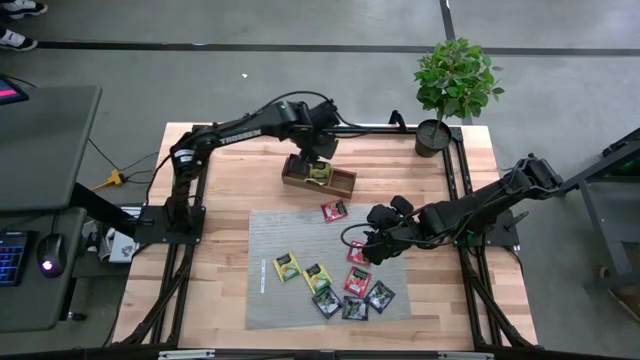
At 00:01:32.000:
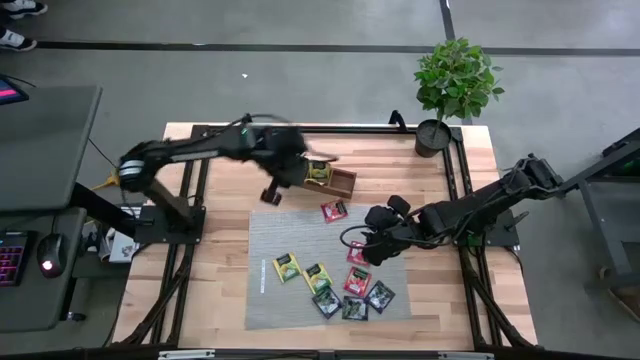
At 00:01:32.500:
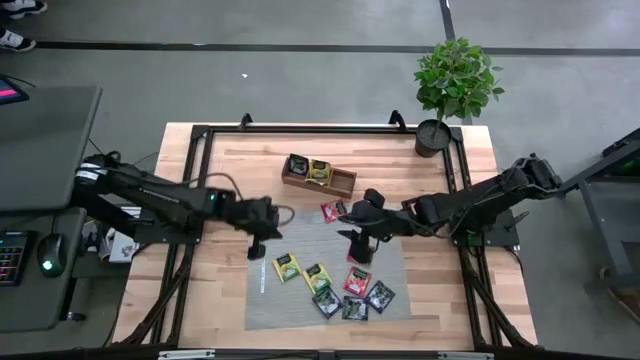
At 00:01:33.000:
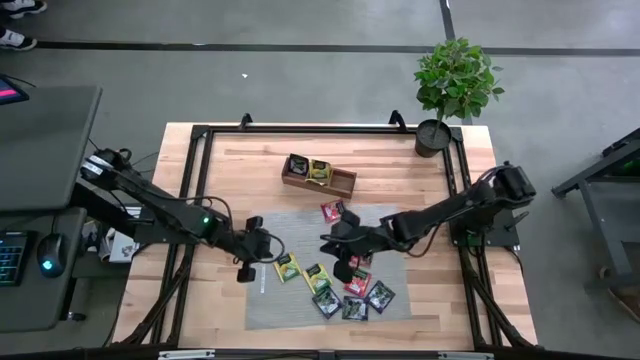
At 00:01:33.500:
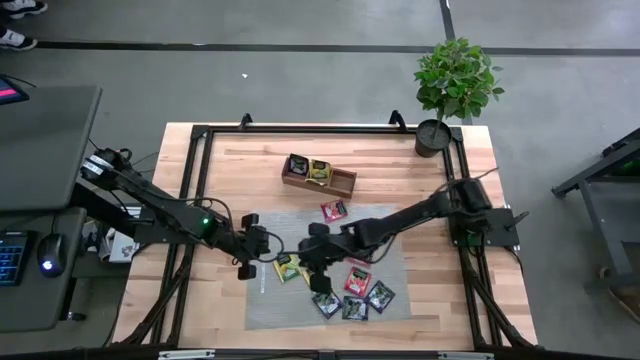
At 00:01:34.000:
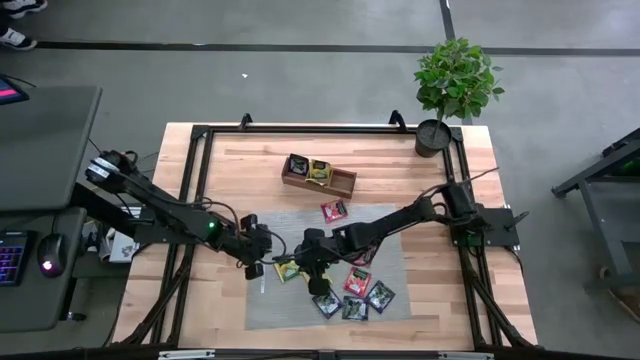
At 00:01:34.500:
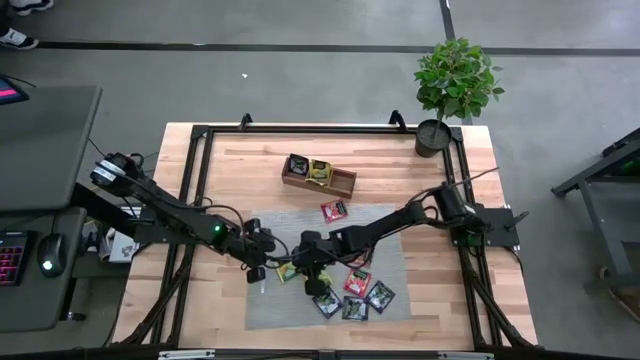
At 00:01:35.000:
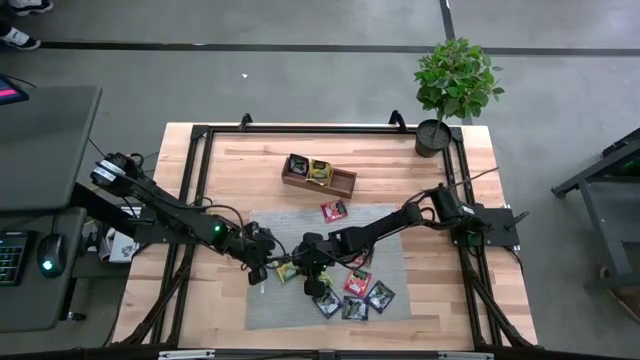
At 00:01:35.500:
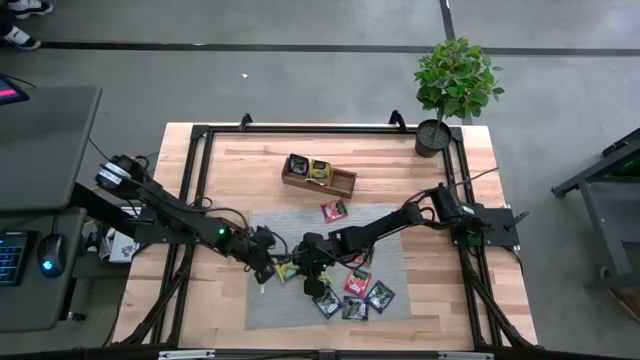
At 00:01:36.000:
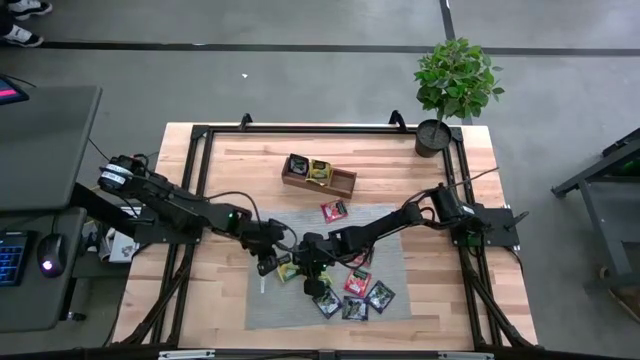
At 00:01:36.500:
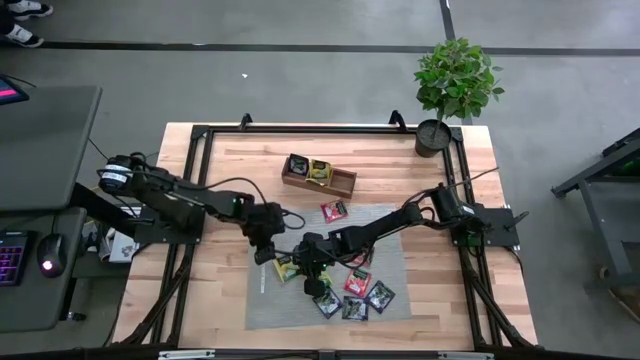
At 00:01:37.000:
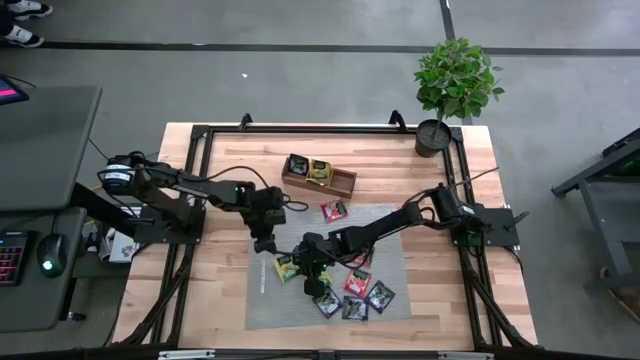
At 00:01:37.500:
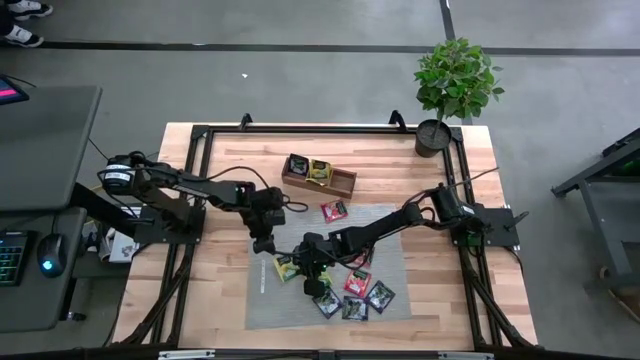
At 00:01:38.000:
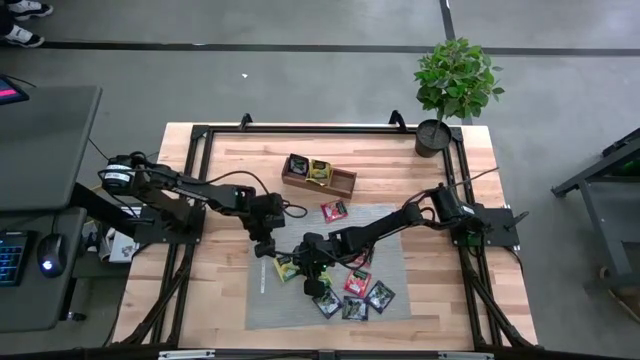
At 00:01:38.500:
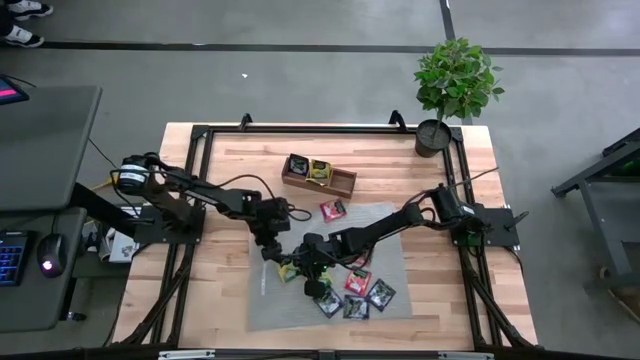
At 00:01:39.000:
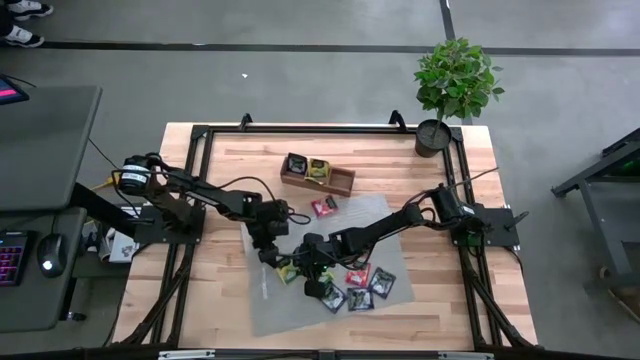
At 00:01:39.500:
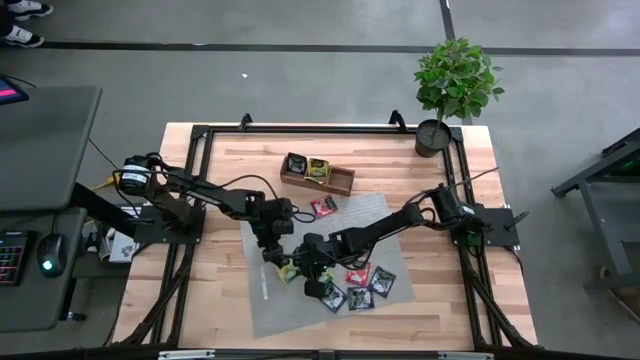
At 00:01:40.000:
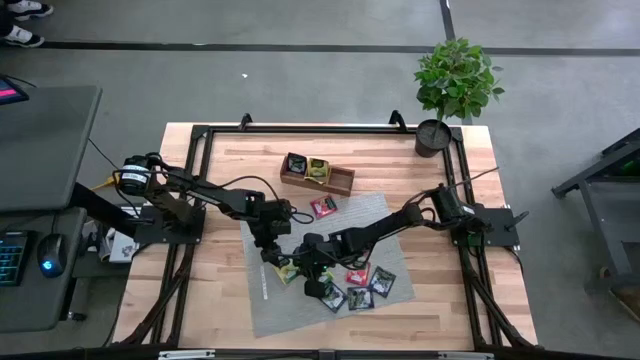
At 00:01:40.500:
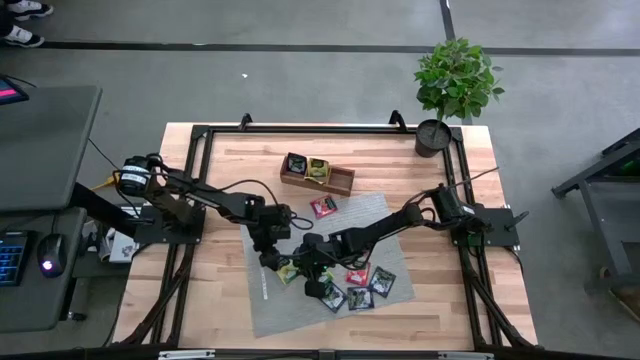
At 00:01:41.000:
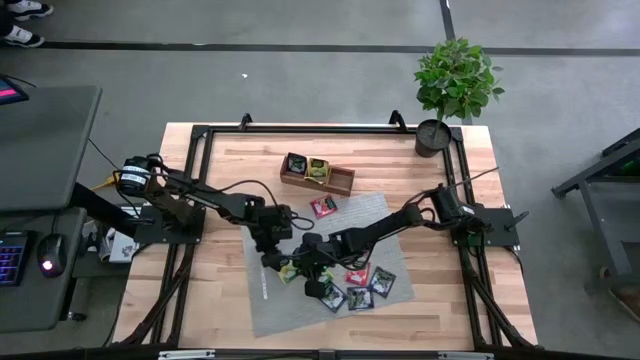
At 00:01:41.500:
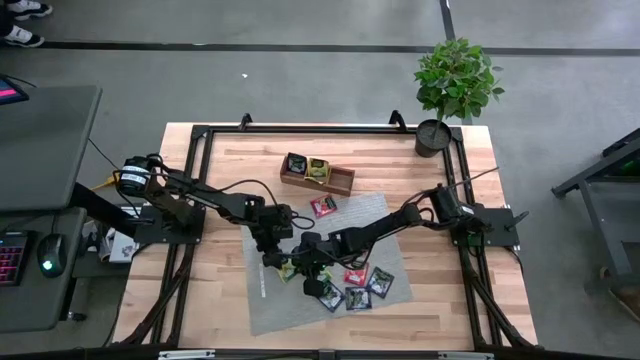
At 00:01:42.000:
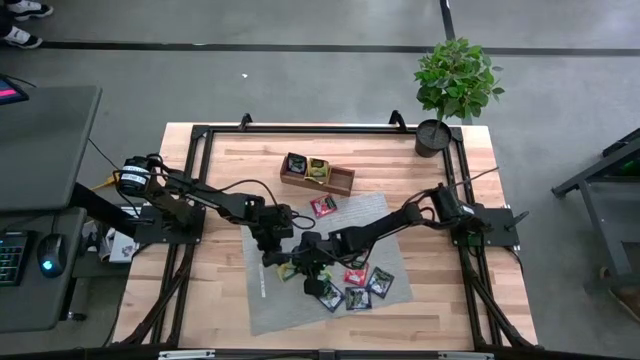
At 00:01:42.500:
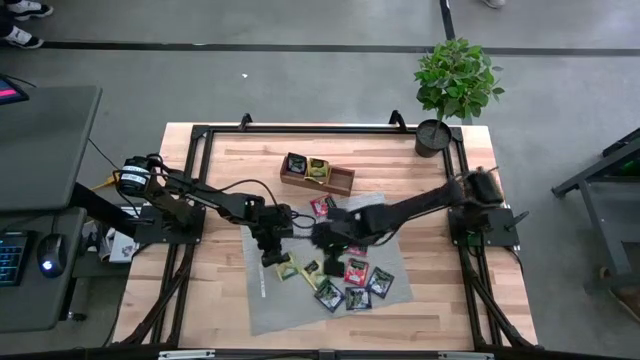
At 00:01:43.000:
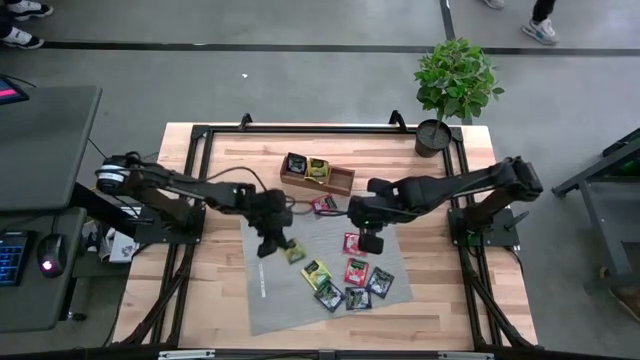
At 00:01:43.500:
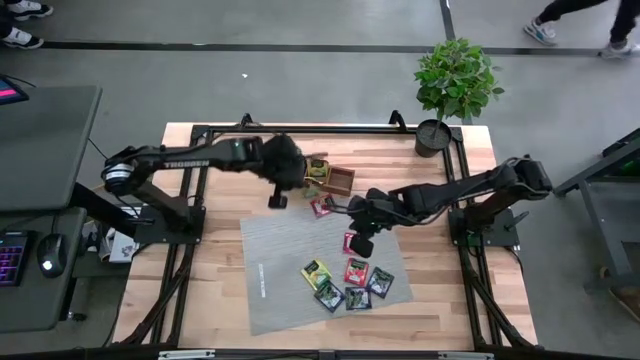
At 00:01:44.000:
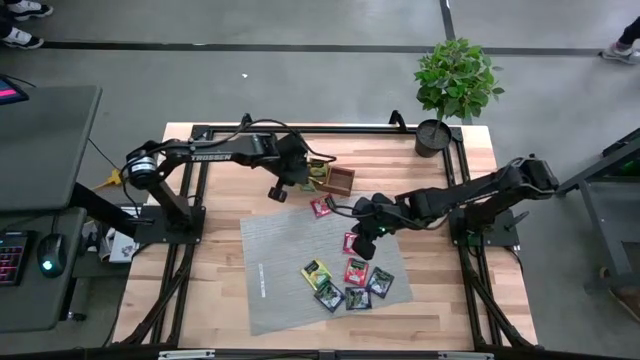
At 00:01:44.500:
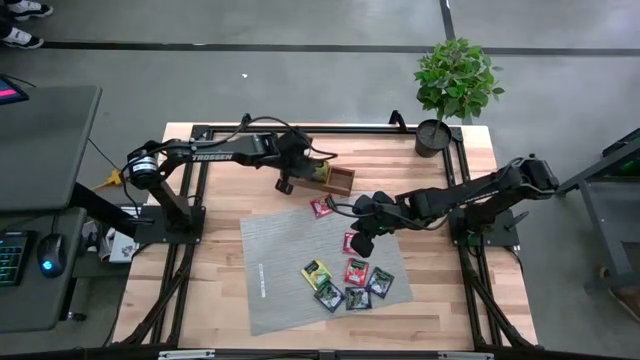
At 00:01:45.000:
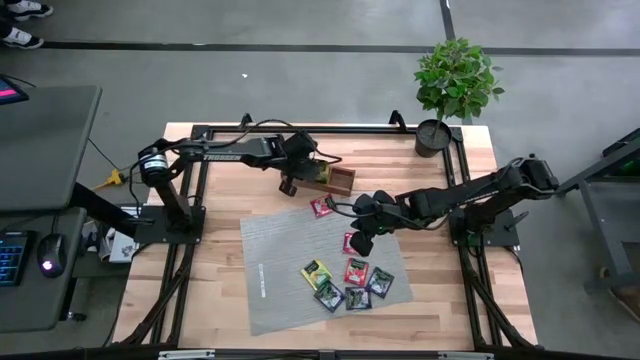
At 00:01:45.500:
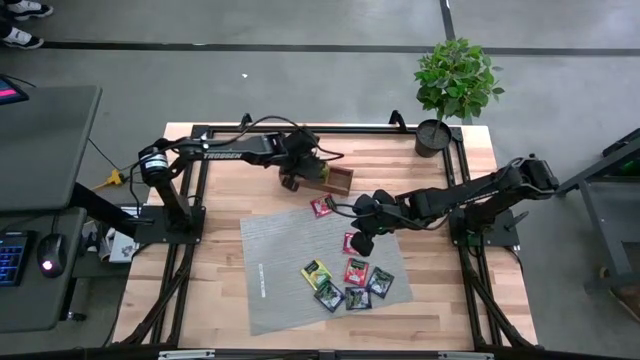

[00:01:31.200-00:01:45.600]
Task: Pick & Place Tea
Put the yellow tea bag into the middle section of the wooden organizer
